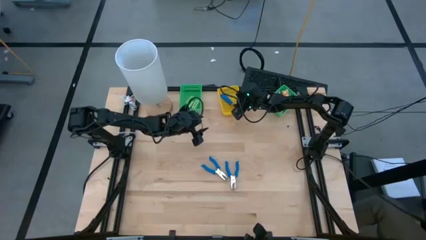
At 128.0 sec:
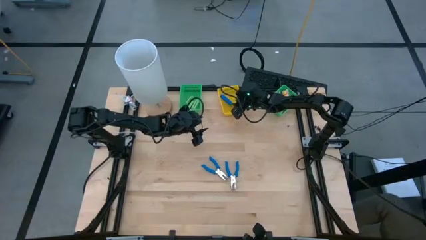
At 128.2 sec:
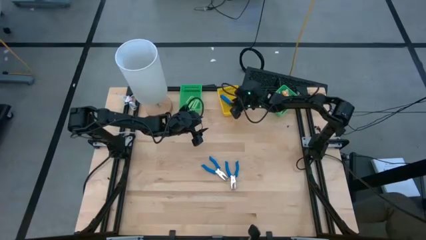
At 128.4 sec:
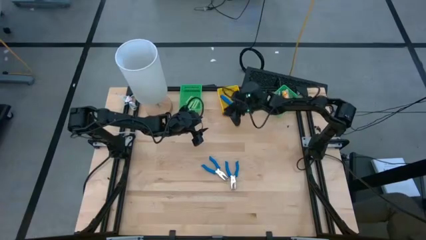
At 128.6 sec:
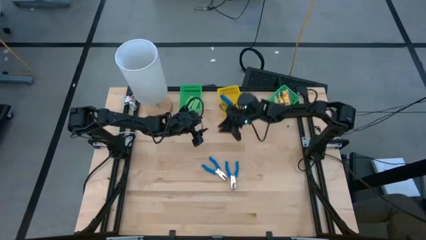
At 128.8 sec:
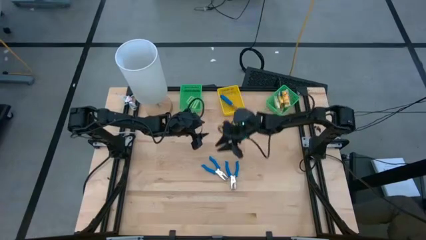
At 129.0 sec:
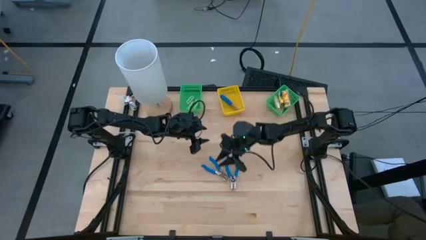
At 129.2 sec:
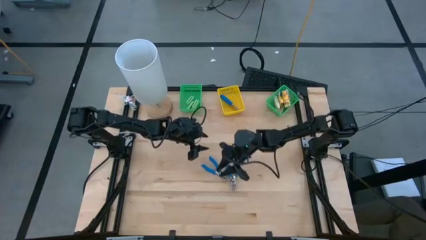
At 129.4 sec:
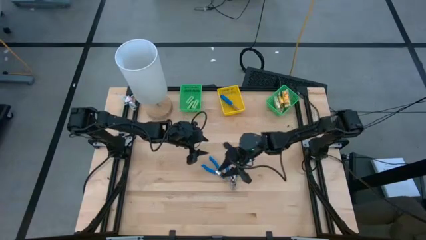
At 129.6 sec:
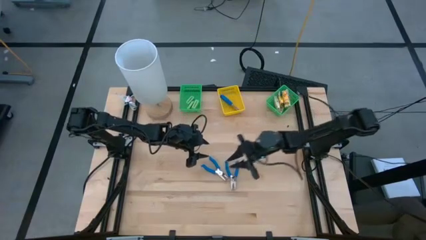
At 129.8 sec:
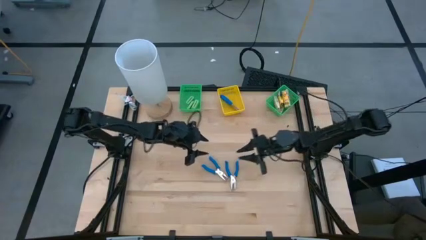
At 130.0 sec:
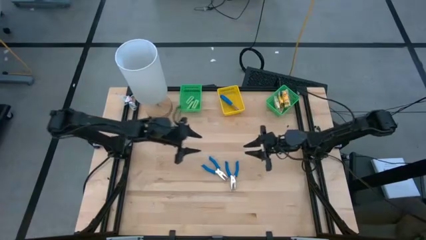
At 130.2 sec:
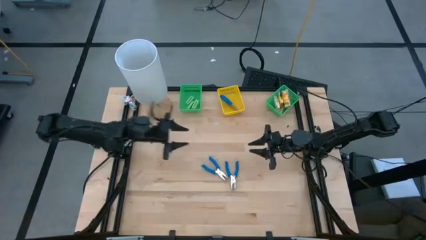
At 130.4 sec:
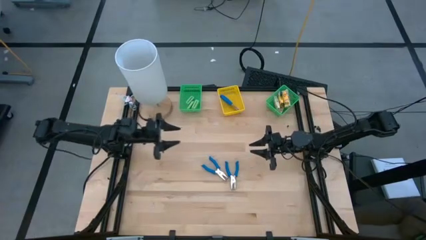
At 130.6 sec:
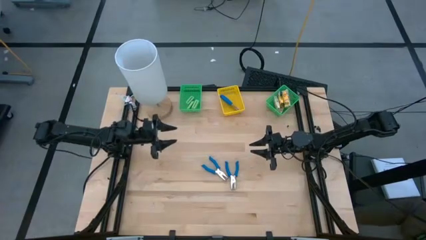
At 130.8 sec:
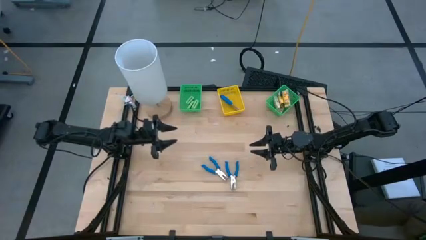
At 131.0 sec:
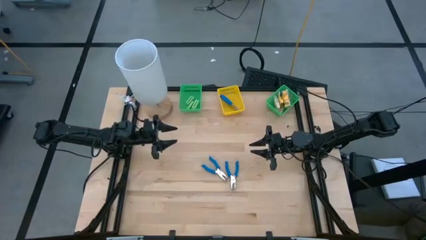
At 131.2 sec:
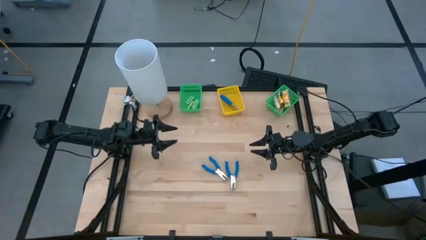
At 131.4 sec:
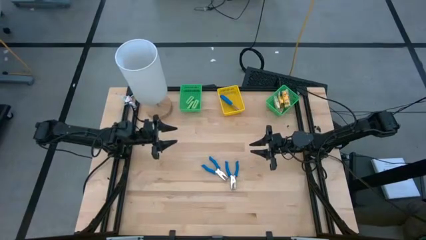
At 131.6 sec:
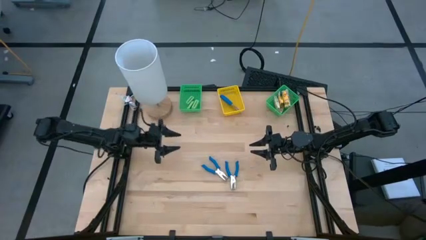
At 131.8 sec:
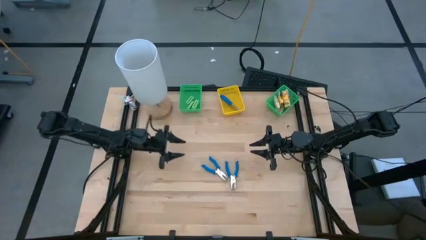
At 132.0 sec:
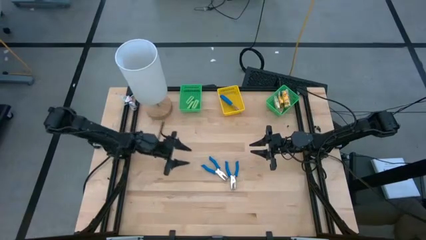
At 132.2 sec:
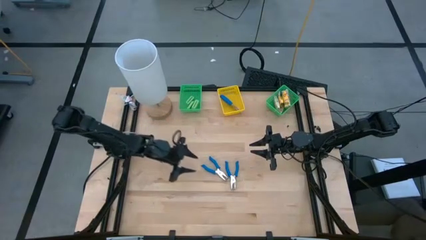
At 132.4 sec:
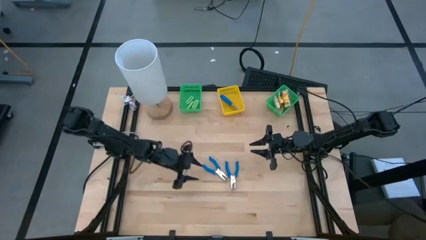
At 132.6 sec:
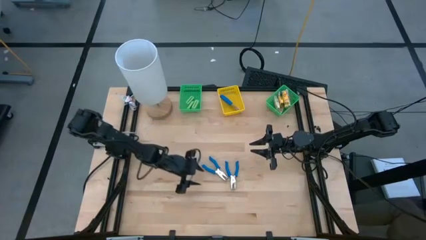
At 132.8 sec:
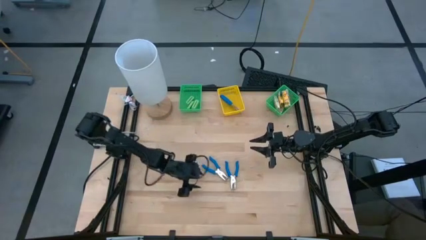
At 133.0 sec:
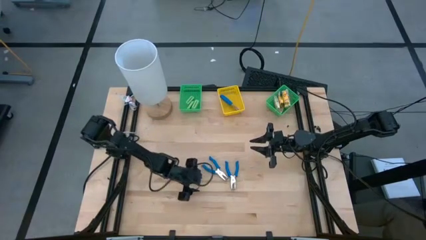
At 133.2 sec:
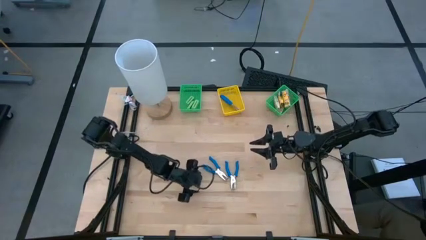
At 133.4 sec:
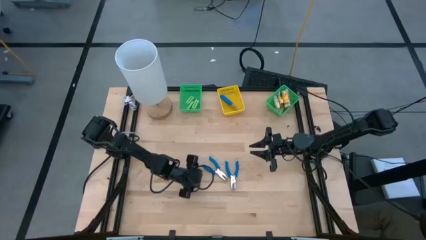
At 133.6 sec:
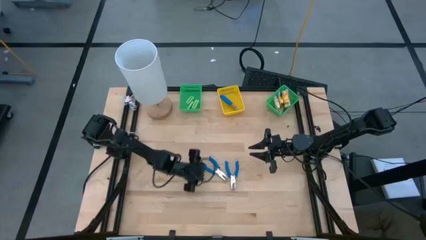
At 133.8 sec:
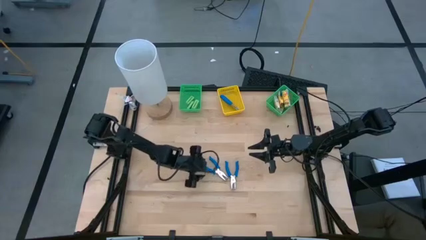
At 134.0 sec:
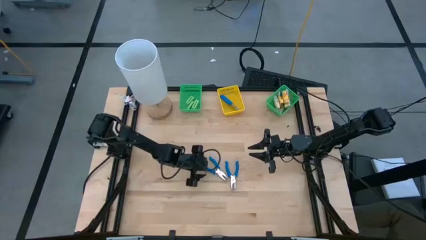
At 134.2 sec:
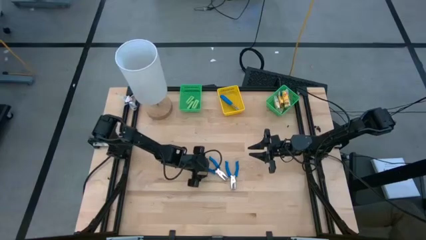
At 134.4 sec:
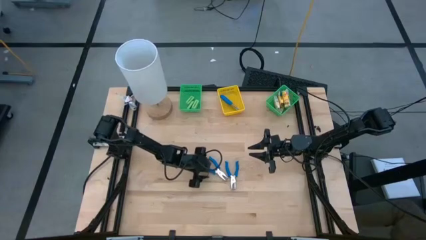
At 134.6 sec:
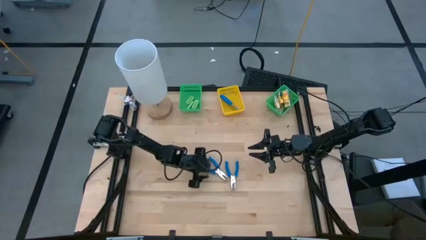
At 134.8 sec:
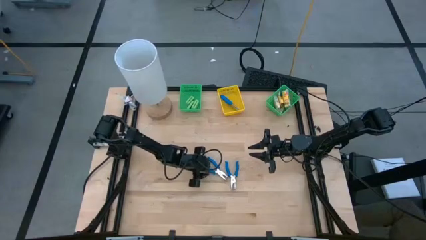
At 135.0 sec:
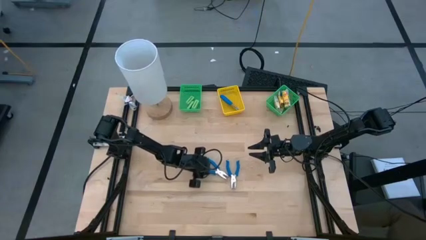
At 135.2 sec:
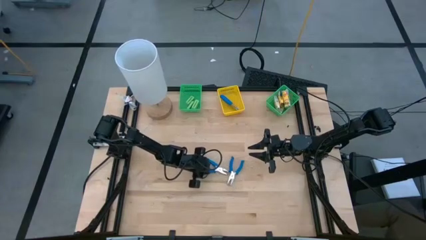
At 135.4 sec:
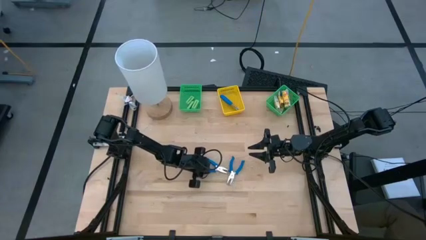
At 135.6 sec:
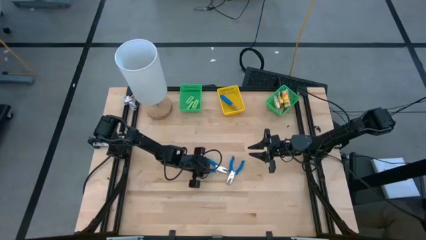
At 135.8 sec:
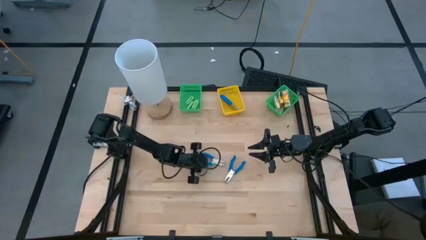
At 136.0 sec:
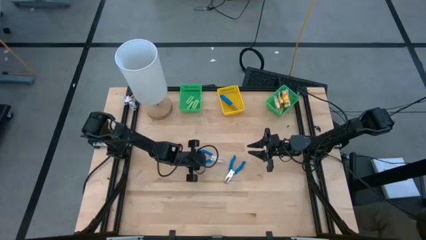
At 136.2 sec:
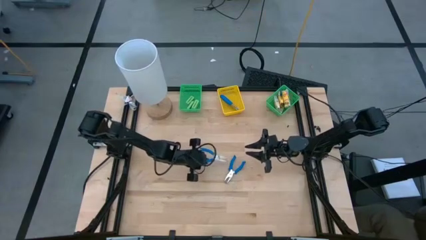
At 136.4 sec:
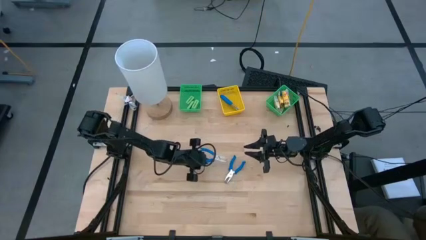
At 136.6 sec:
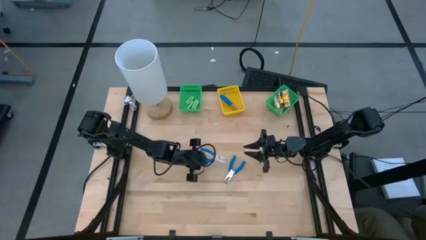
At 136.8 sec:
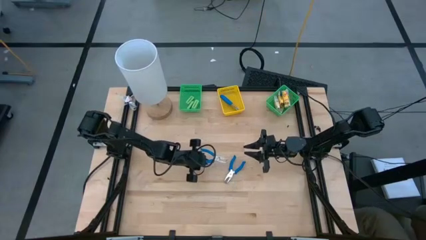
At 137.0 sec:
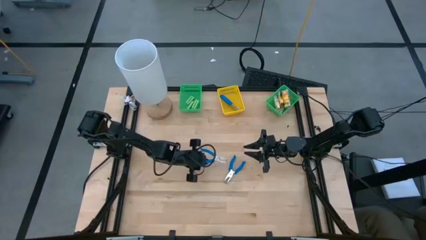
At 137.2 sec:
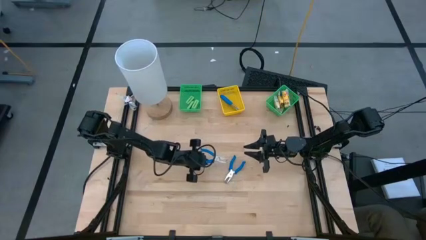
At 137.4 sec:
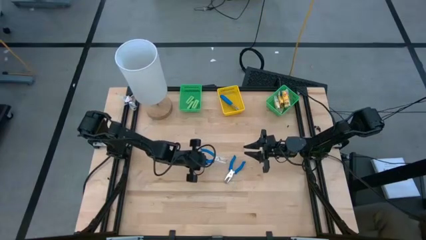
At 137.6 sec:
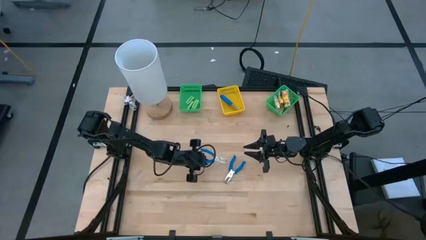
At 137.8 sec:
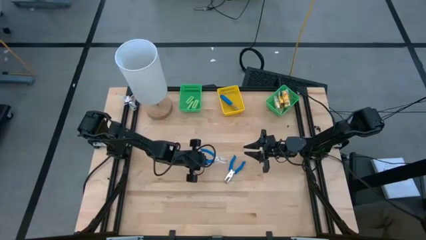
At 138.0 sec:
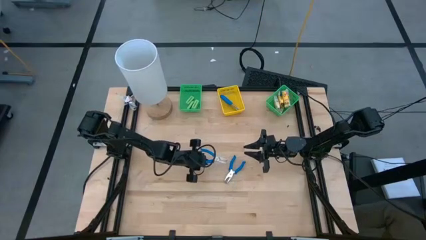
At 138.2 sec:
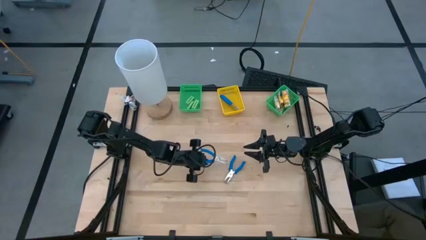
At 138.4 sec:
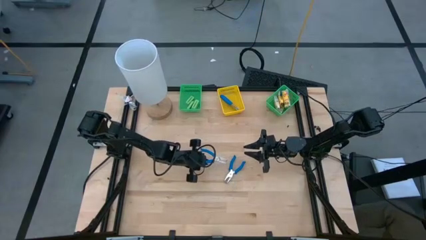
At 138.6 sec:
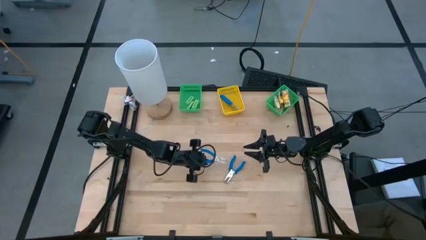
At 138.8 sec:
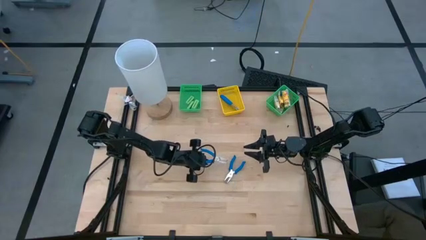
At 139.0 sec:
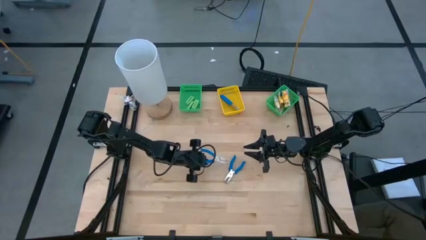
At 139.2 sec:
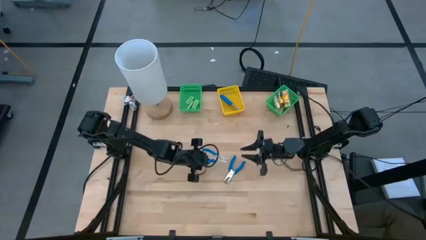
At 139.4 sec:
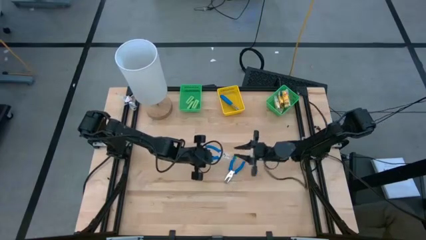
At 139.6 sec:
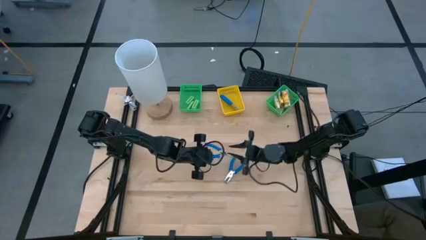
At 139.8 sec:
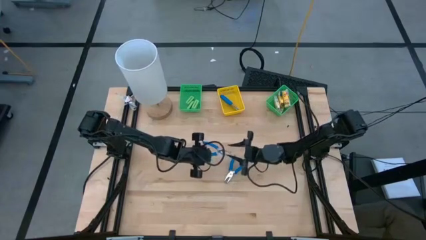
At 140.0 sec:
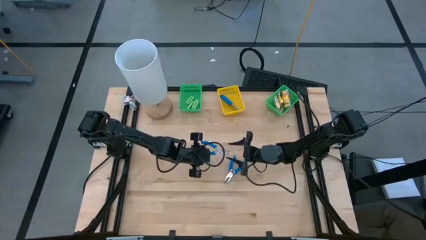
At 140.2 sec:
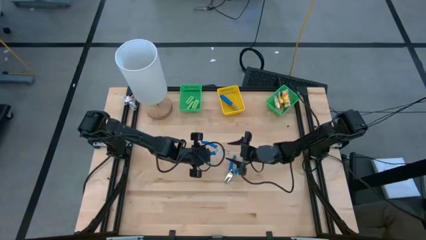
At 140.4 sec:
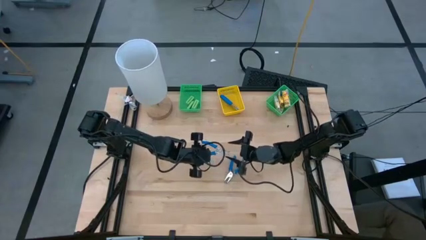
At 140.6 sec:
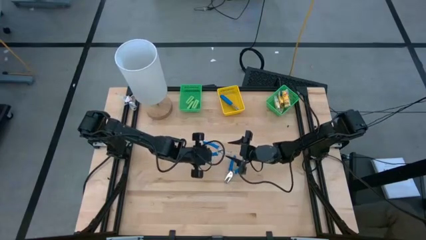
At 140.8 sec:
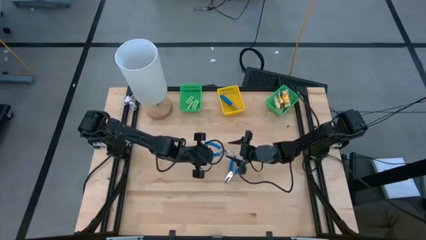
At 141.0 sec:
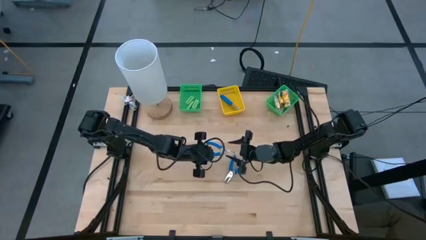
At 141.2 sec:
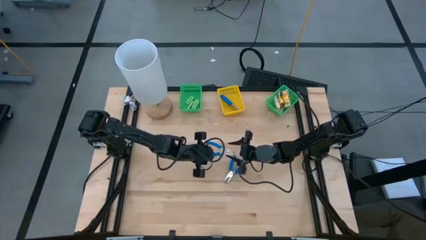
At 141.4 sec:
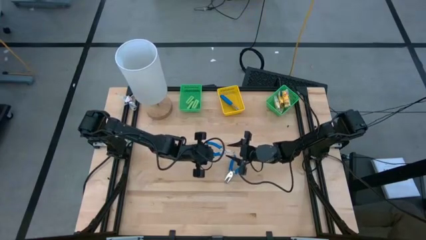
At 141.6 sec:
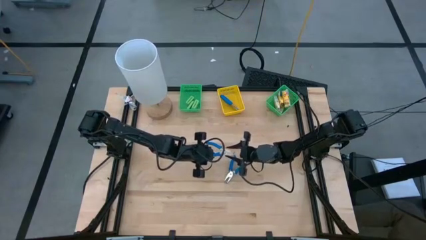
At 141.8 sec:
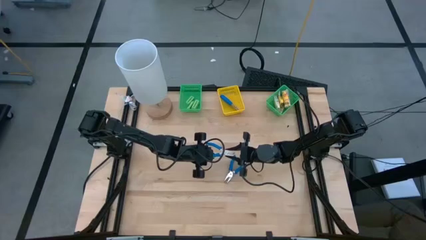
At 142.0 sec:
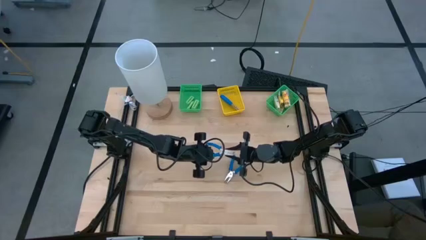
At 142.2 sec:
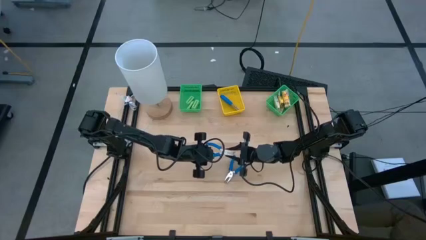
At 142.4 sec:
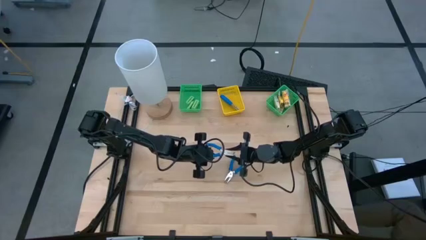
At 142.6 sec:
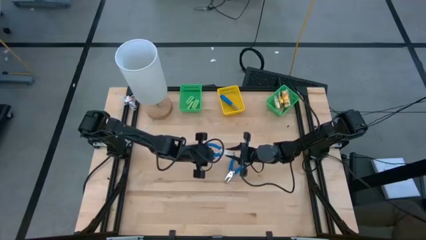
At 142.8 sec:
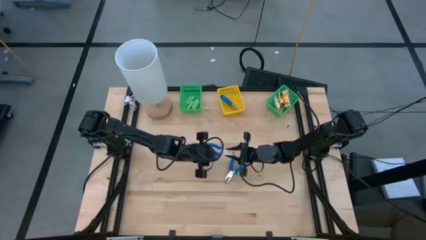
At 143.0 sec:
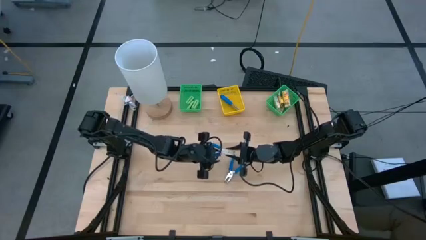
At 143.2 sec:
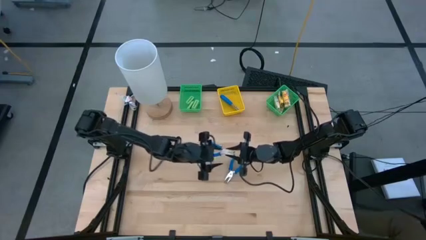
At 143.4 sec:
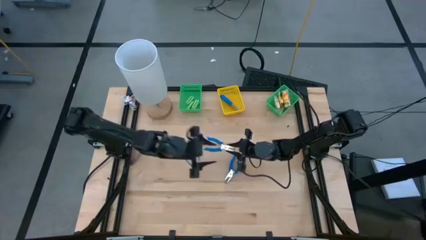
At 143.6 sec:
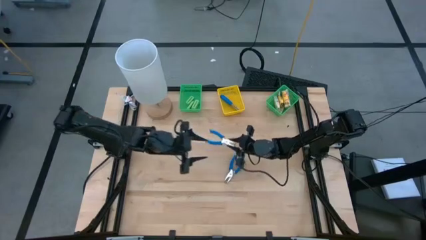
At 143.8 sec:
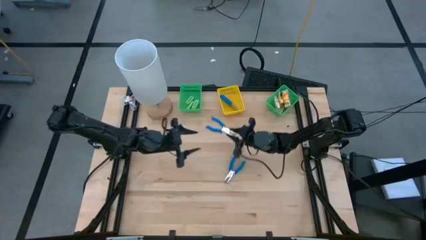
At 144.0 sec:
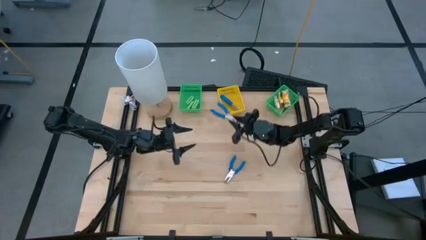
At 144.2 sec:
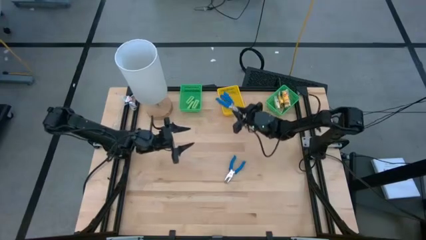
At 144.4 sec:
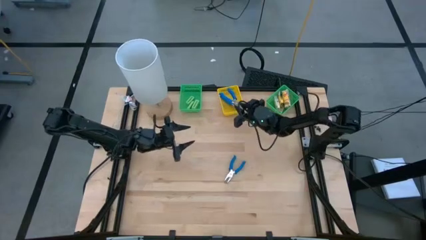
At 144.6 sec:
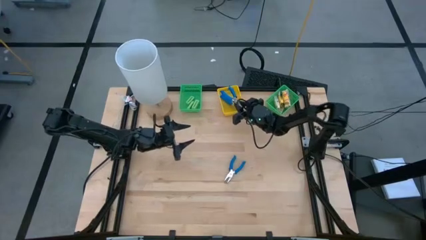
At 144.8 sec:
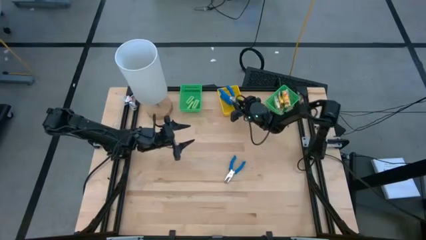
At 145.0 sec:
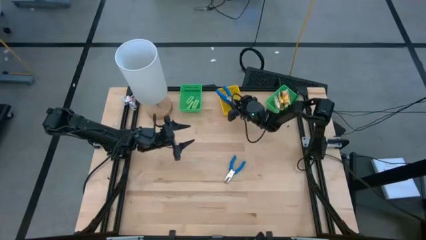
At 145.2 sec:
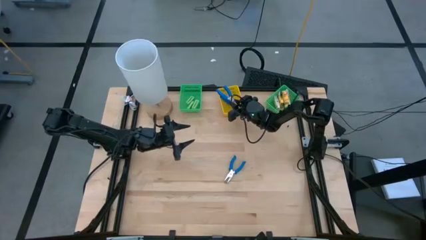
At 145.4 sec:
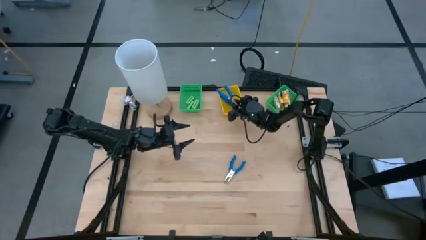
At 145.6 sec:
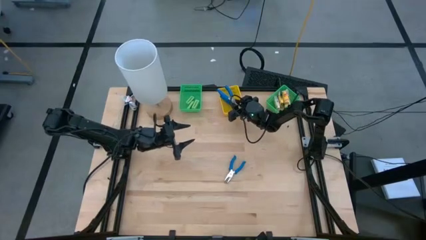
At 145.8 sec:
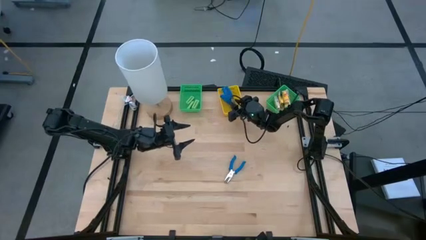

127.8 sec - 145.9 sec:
Task: Pick & Place School Supplies
Put the blue puncher into the yellow bin
